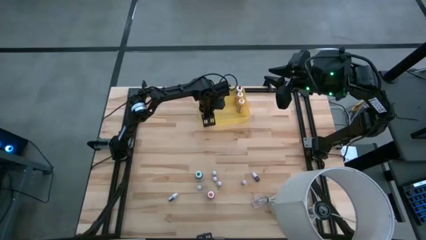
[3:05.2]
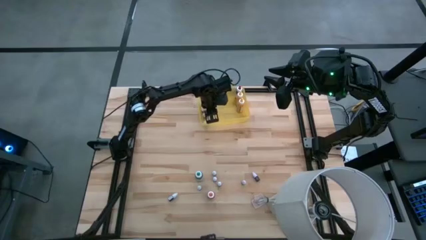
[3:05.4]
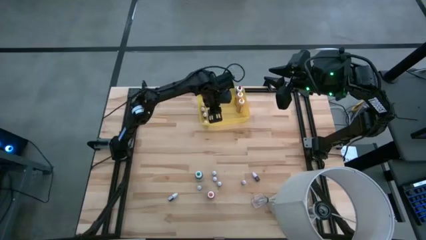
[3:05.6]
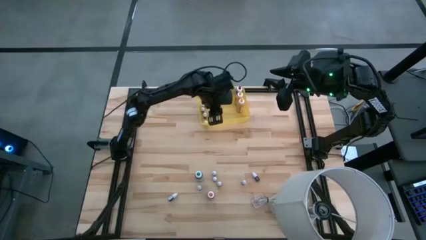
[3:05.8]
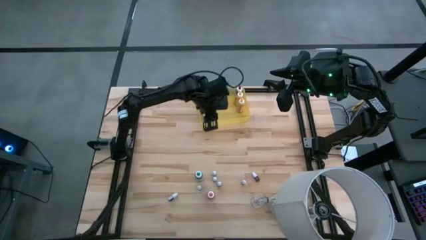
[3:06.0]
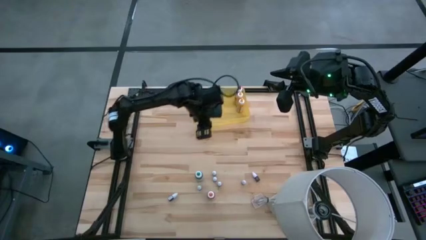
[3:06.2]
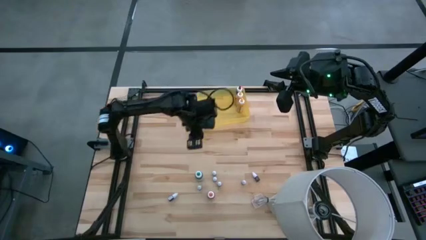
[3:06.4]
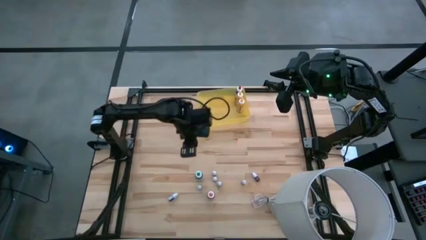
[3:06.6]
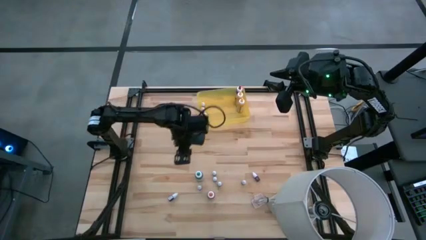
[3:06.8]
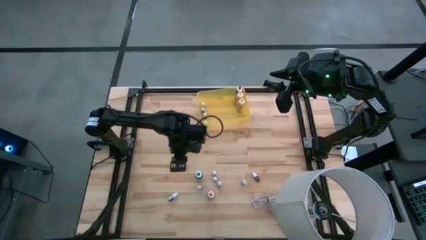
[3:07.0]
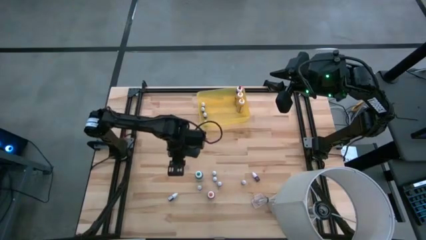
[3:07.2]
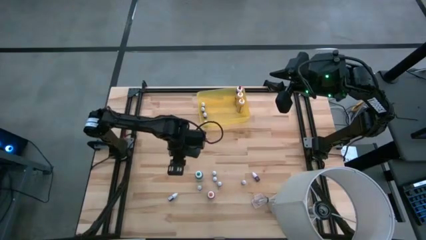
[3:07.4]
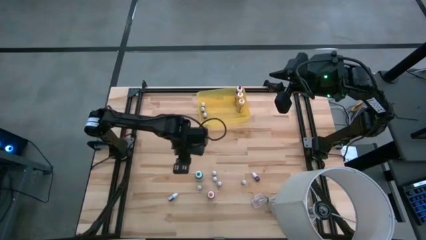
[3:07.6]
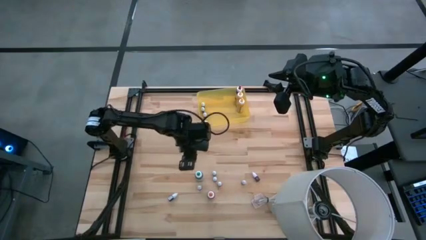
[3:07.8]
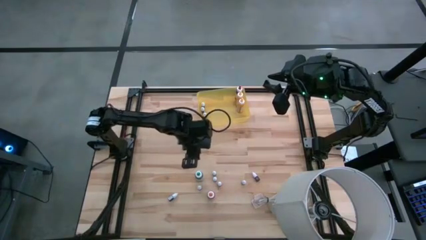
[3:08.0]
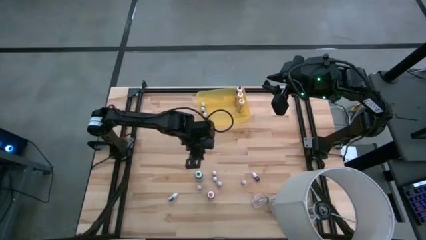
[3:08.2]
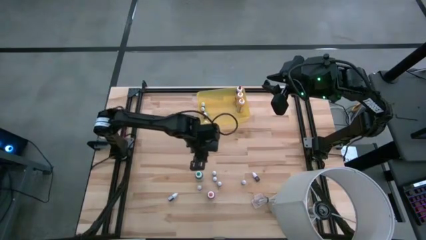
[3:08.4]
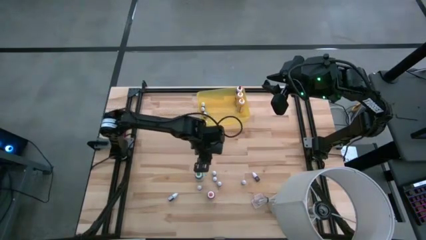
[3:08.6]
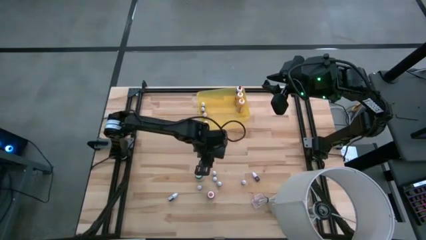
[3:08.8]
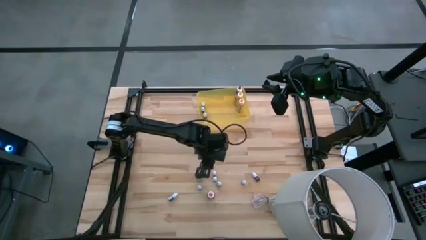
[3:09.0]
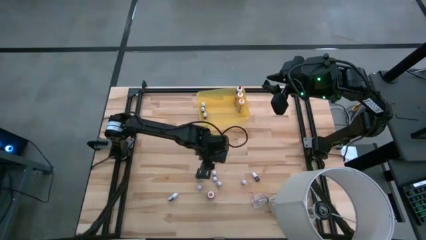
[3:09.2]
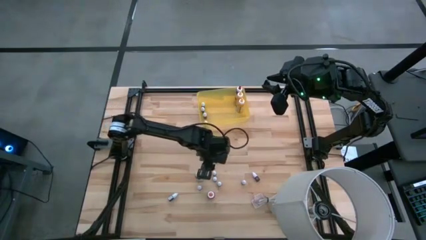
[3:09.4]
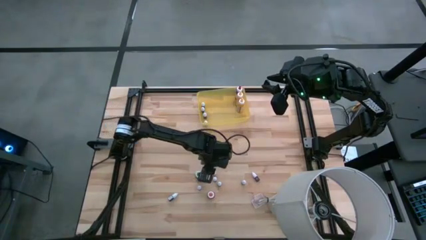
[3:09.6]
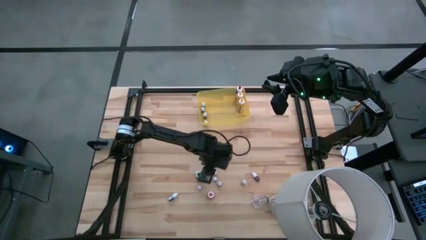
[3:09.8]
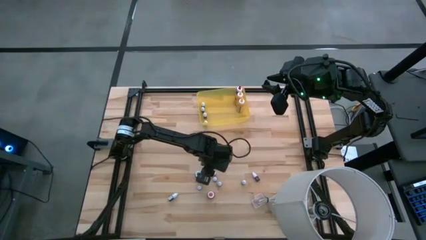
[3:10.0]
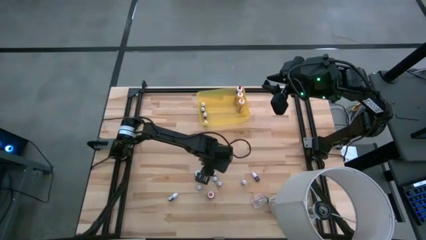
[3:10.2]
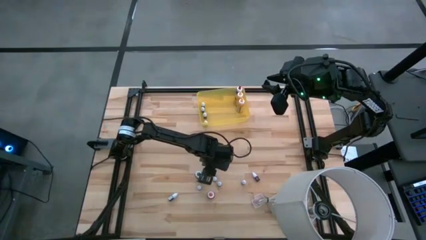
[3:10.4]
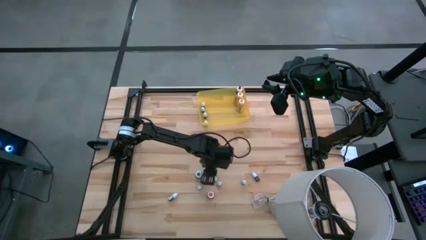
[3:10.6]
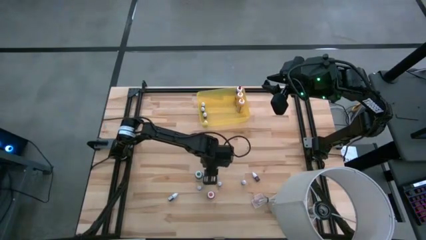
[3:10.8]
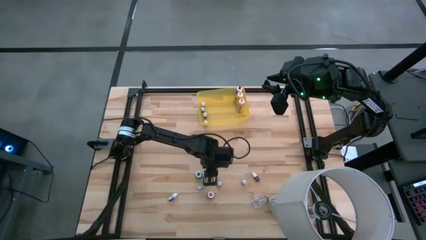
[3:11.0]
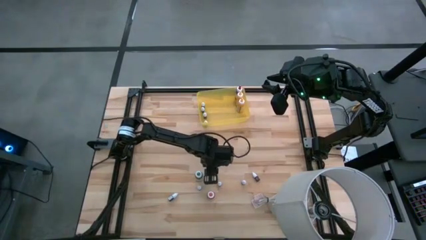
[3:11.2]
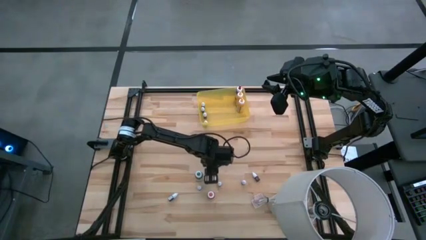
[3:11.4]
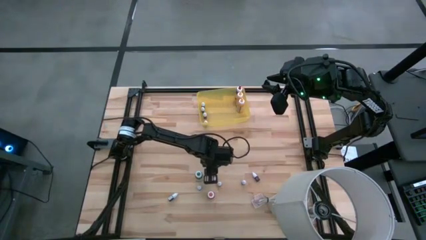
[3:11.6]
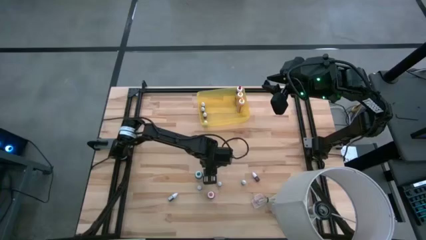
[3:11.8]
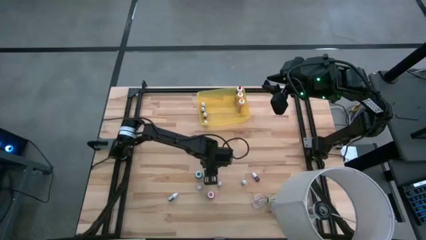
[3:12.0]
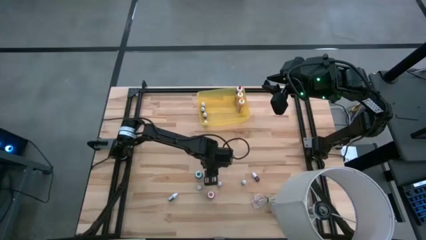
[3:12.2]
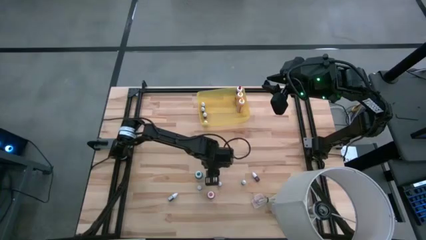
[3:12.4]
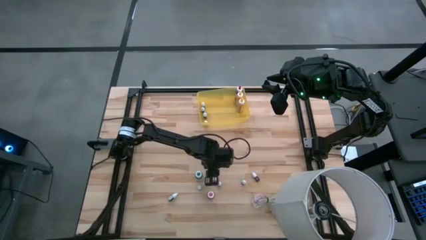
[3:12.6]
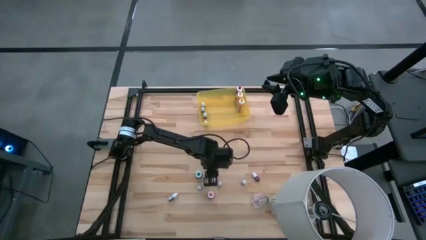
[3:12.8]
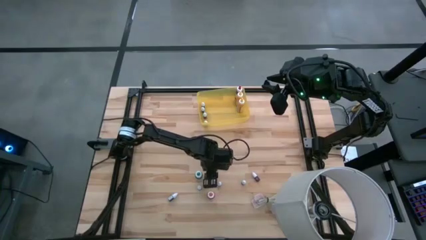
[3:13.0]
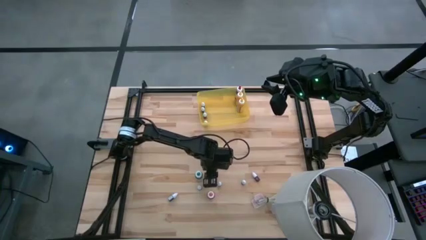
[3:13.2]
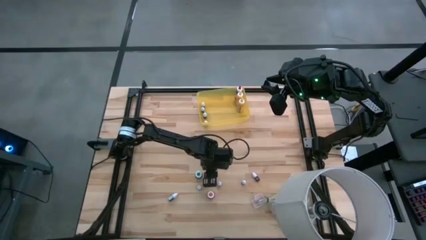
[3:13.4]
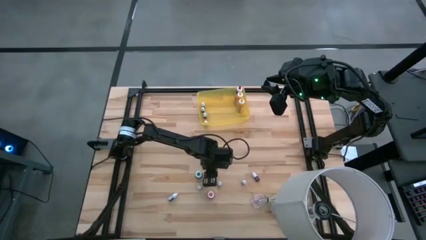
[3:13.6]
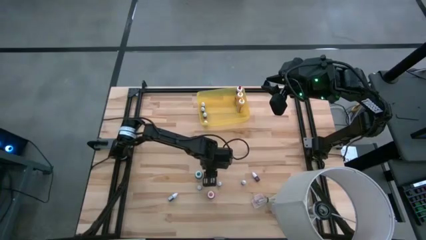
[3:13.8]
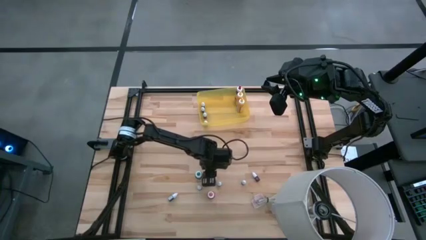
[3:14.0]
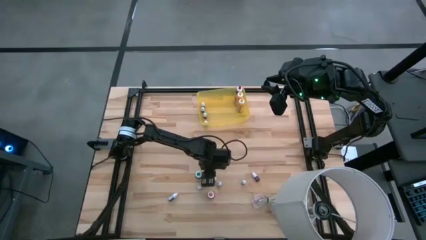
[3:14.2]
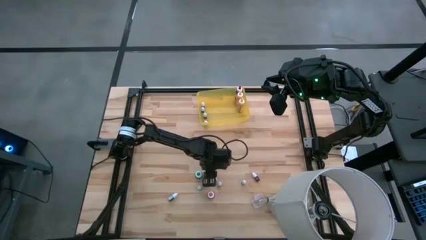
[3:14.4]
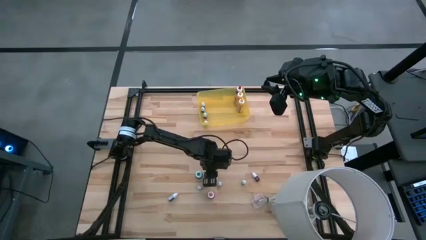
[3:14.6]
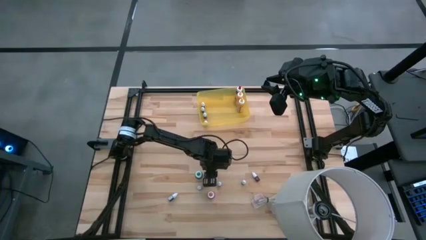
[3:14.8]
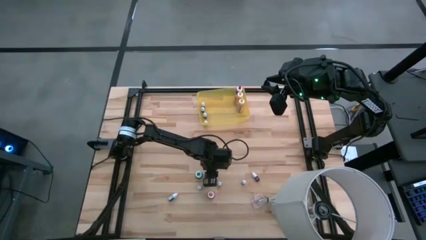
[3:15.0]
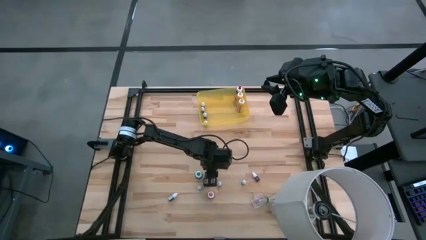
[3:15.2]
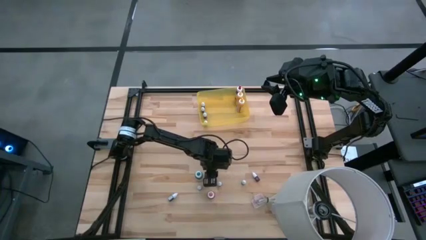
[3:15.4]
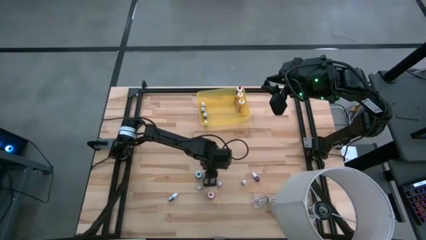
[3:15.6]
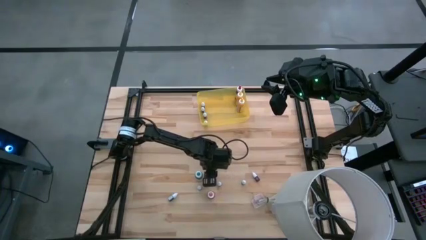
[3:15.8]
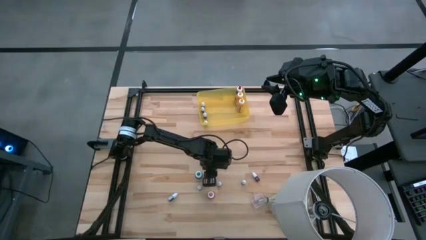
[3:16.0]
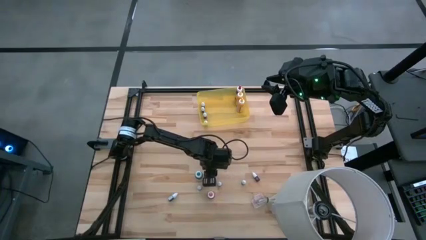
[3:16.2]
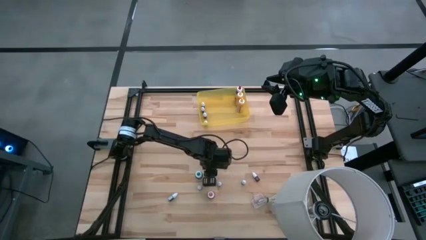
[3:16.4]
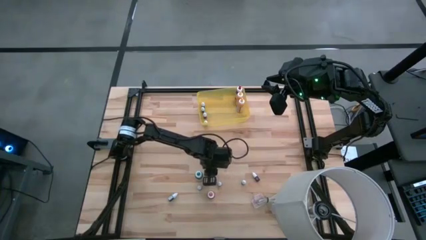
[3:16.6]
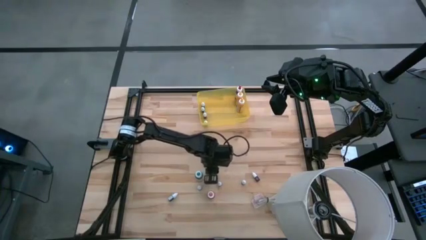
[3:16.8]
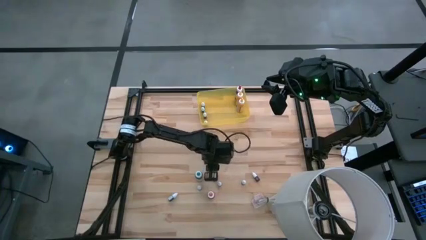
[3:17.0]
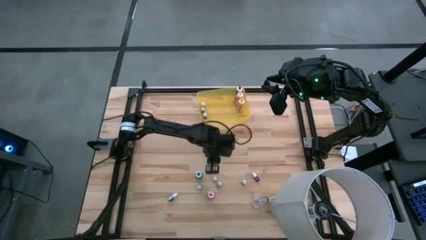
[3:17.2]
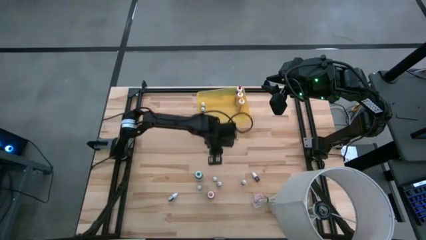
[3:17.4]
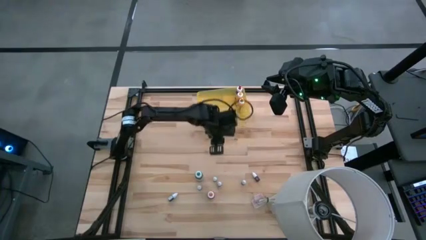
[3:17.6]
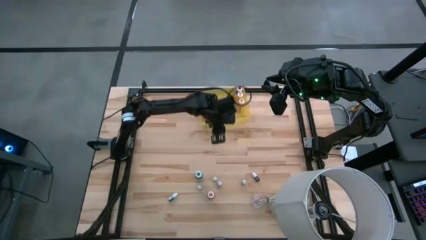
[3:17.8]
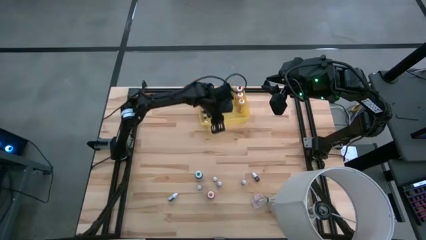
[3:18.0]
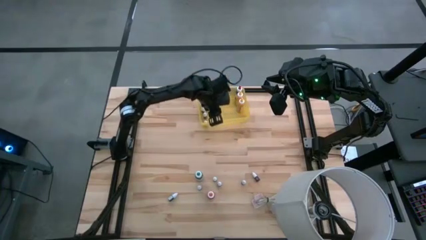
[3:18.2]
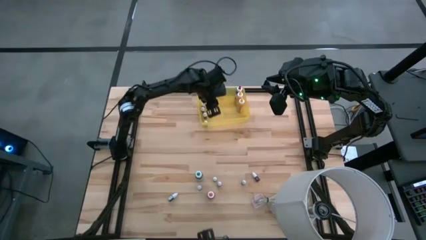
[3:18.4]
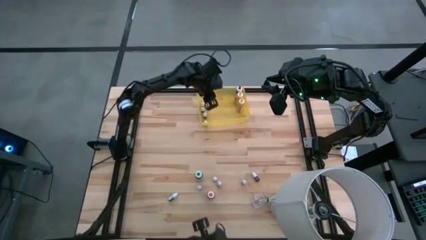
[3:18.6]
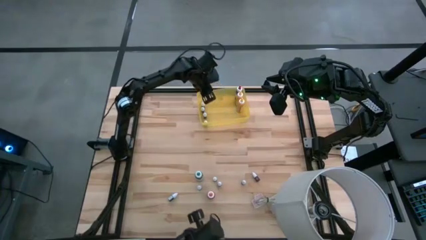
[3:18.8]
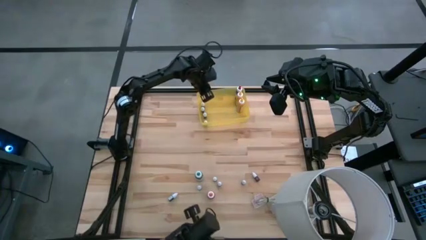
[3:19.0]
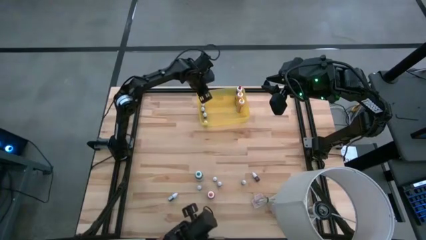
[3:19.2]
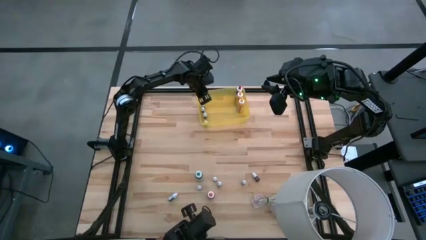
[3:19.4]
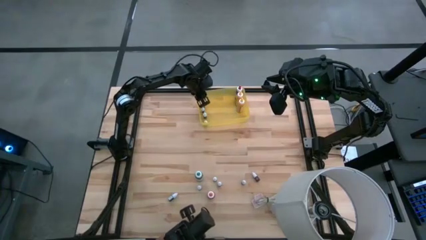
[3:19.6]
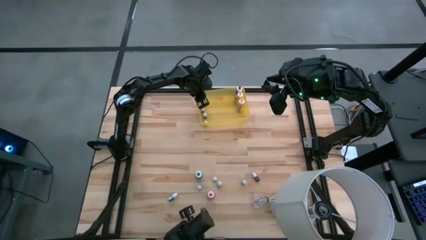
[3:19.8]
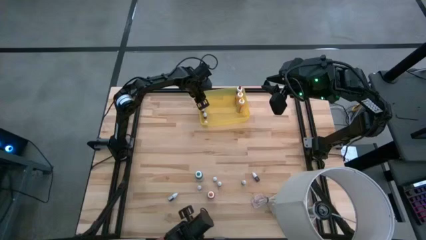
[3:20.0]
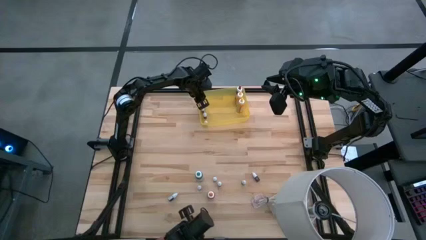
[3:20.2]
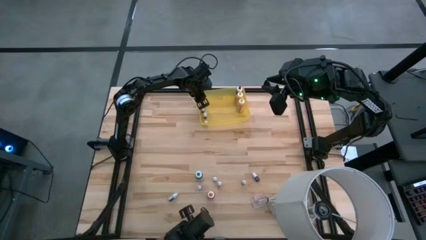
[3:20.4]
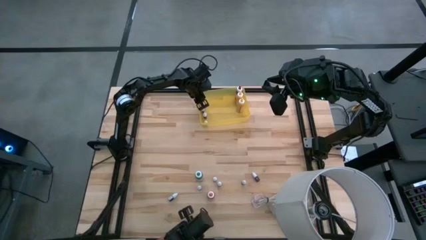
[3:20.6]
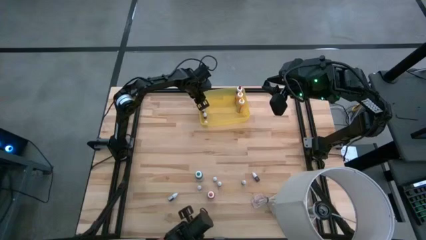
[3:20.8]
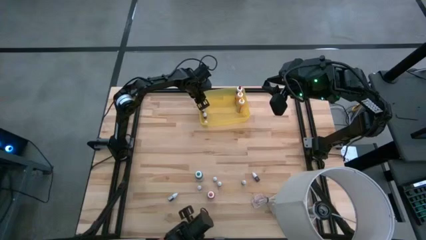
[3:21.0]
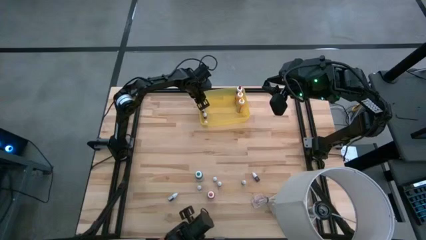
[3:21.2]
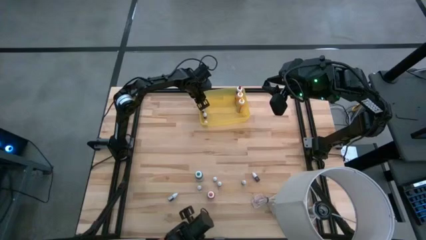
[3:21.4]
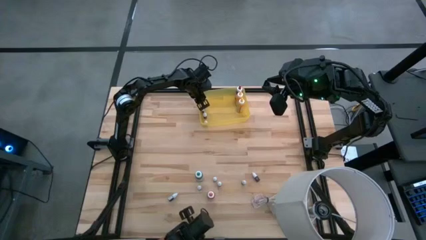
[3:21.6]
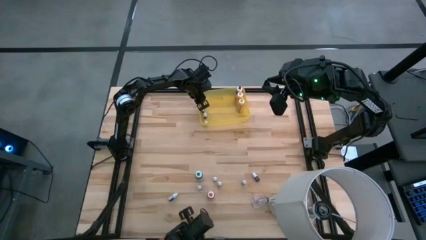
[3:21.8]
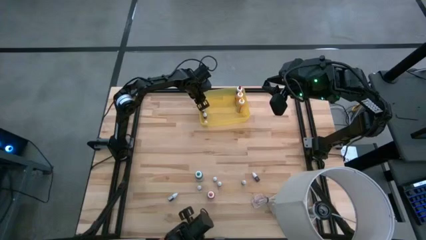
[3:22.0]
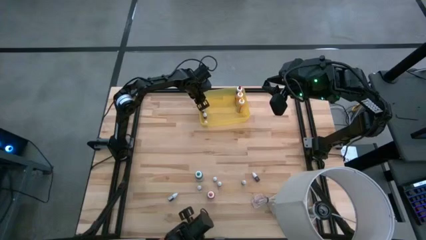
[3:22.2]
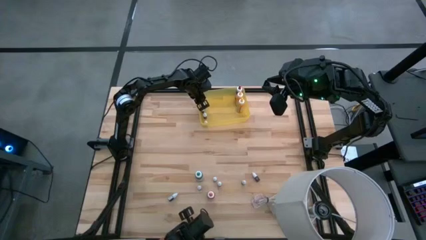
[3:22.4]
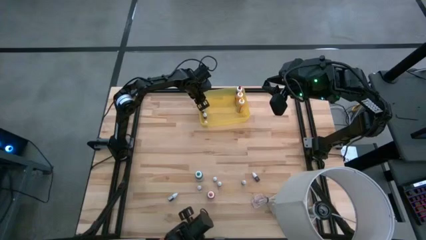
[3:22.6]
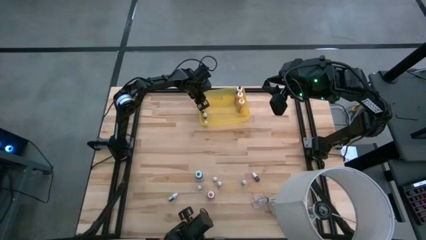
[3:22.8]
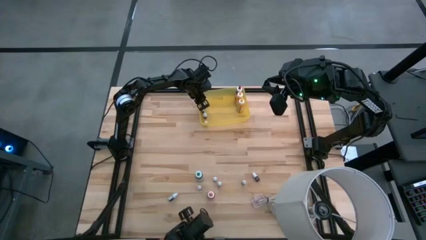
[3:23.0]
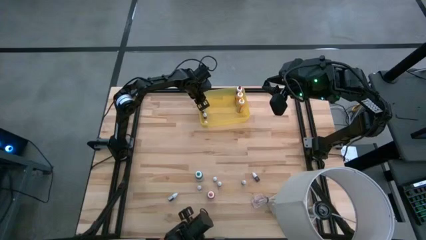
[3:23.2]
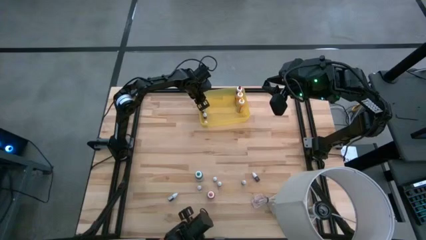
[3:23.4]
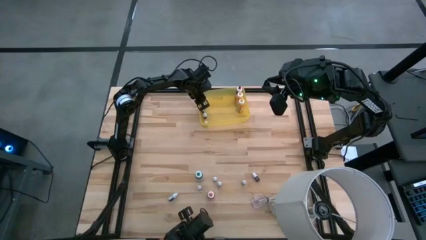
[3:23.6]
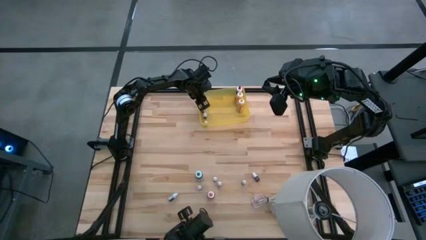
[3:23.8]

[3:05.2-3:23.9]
Task: Pick & Place food coloring
Put the top small red food coloring bottle into the yellow bin
